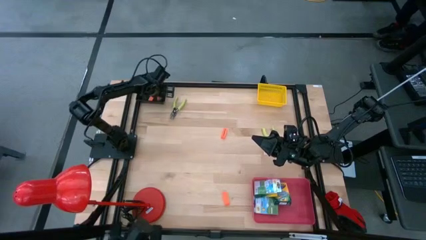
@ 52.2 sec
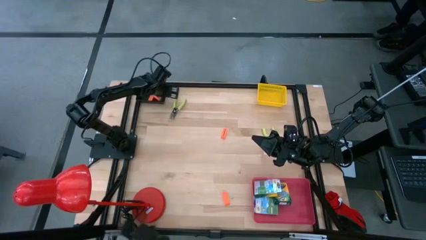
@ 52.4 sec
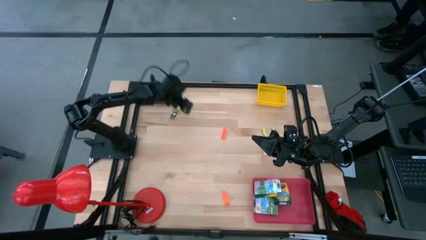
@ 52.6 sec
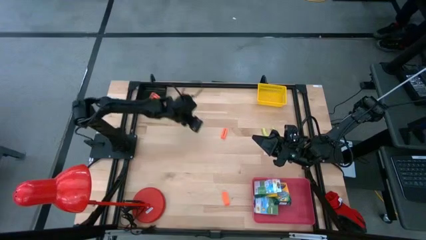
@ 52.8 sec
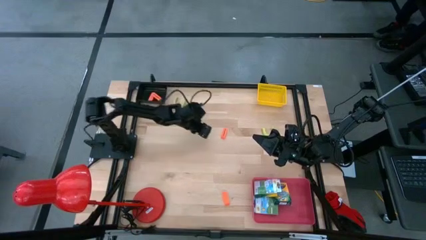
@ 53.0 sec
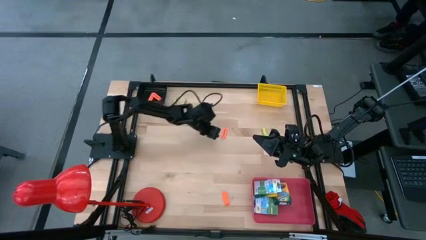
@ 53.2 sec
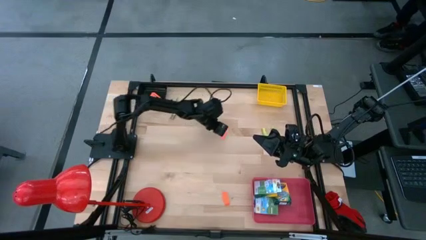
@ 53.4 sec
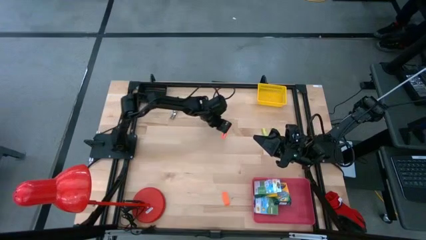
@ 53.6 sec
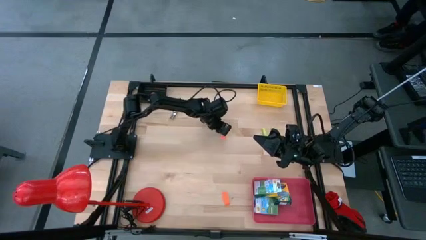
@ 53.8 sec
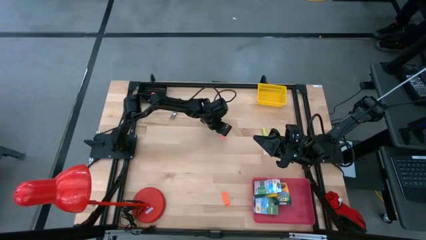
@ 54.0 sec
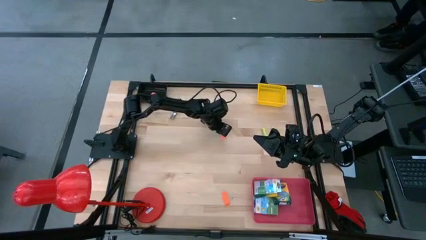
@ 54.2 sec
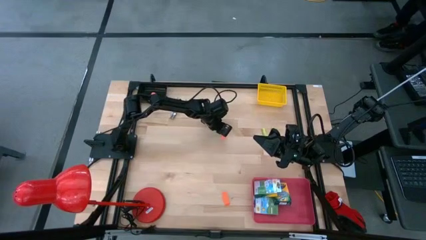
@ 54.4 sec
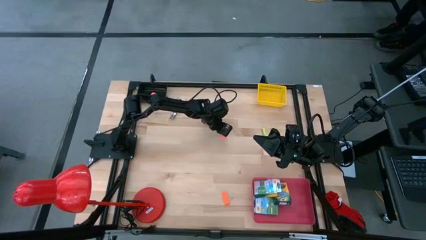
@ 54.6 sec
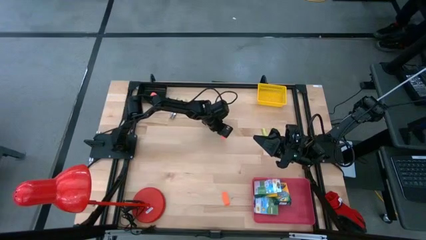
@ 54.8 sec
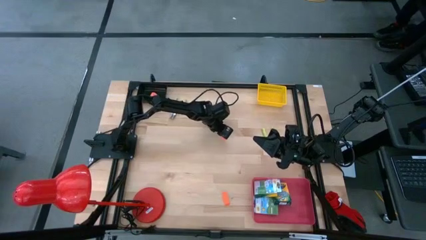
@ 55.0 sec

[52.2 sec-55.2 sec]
Task: Pick & Place School Supplies
Put the orange eraser into the black bin

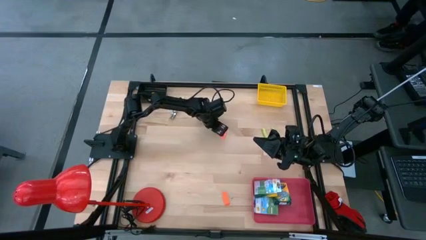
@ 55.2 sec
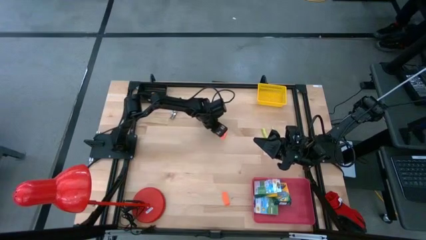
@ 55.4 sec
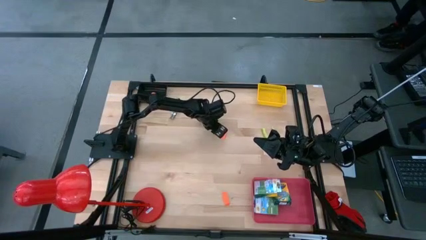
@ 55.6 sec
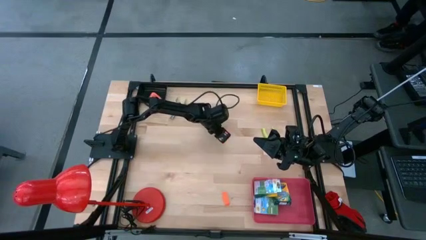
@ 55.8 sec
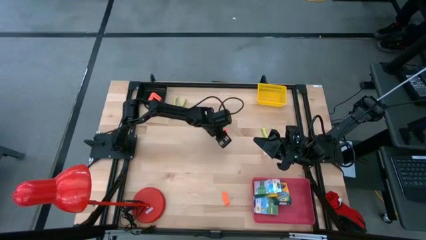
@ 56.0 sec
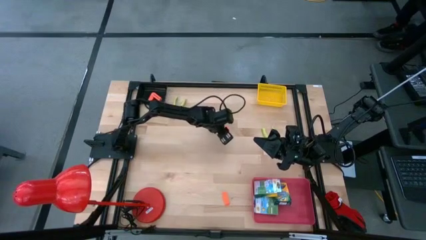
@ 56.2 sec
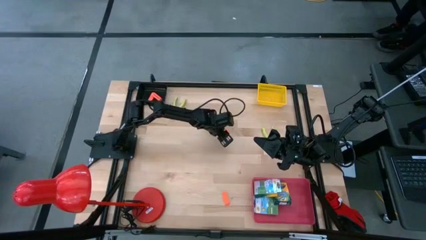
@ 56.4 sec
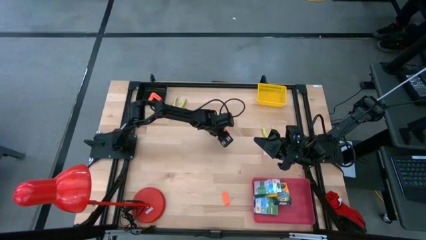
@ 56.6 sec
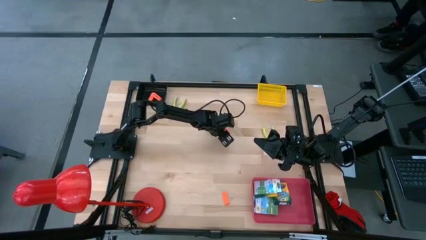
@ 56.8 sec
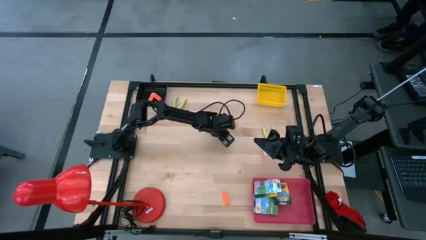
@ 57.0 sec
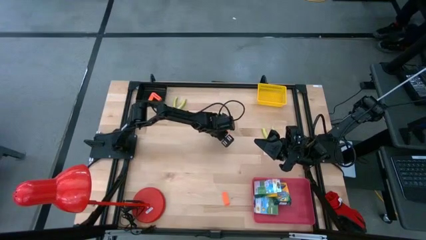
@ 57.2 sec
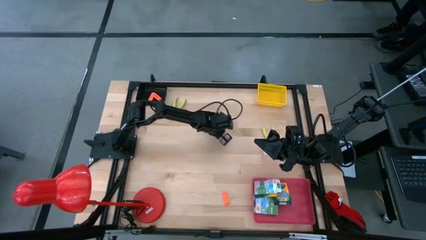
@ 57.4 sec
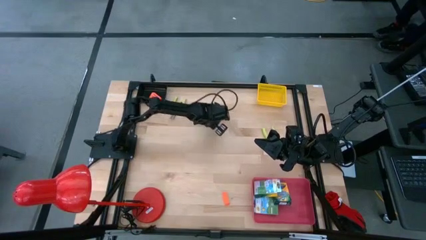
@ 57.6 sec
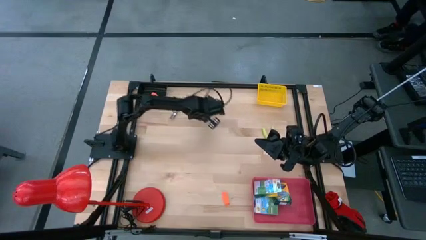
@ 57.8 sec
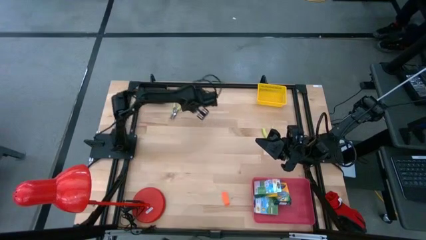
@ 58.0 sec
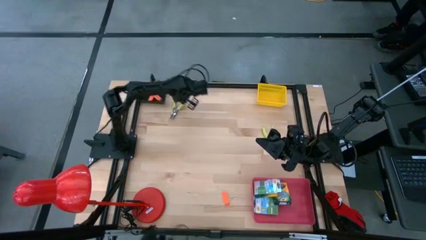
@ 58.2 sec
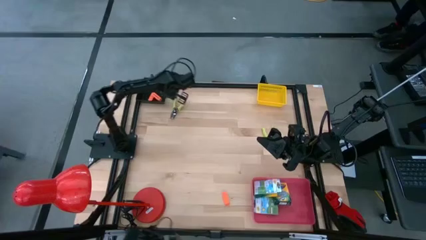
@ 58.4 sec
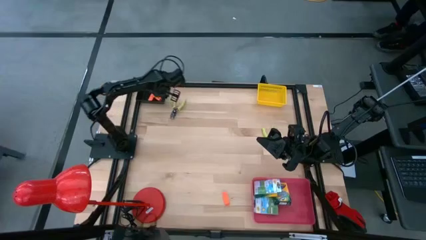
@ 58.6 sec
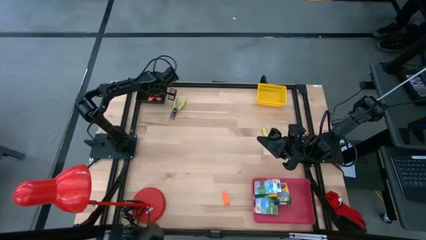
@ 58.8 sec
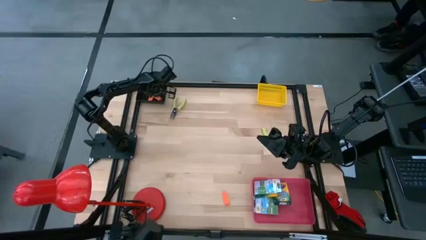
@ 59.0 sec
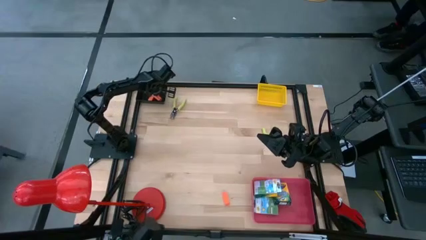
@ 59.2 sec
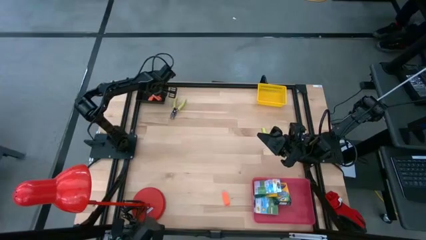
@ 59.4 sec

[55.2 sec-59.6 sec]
Put the orange eraser into the black bin

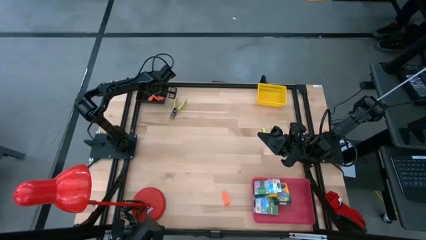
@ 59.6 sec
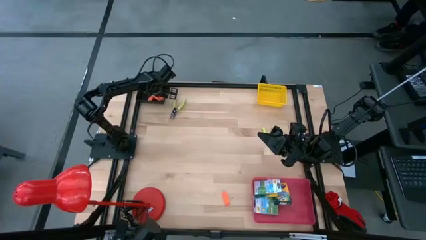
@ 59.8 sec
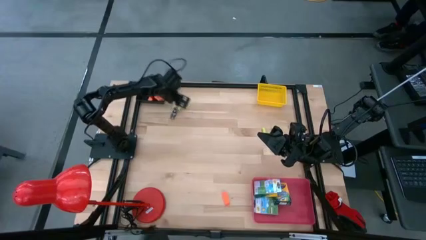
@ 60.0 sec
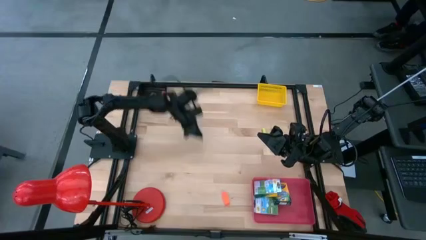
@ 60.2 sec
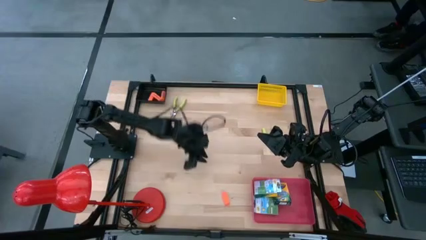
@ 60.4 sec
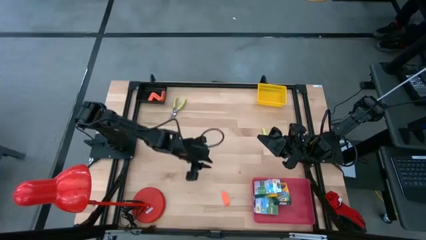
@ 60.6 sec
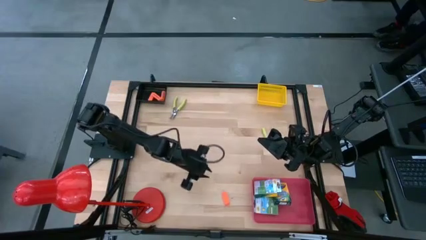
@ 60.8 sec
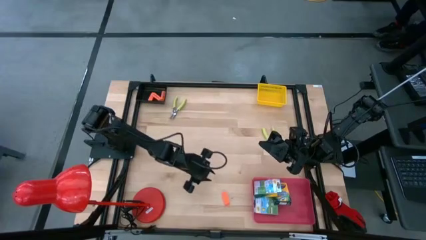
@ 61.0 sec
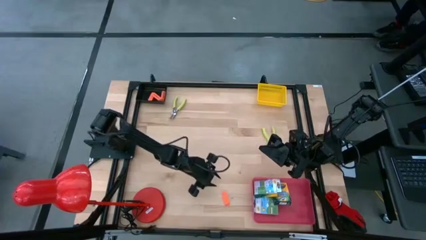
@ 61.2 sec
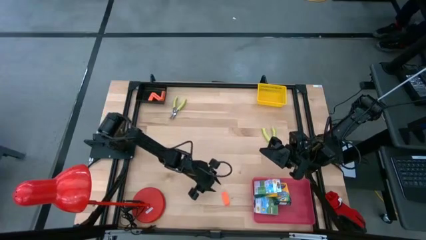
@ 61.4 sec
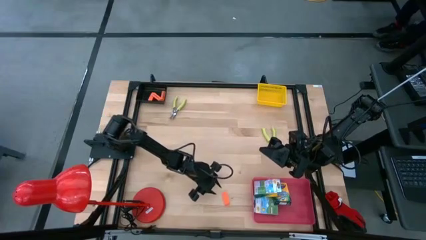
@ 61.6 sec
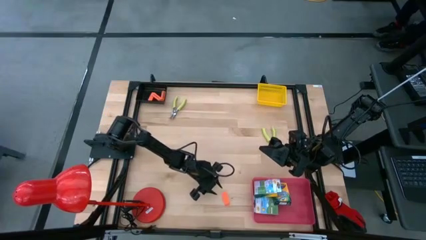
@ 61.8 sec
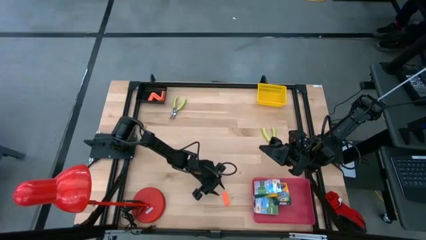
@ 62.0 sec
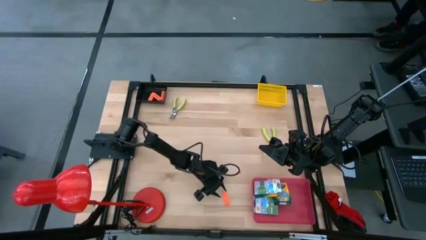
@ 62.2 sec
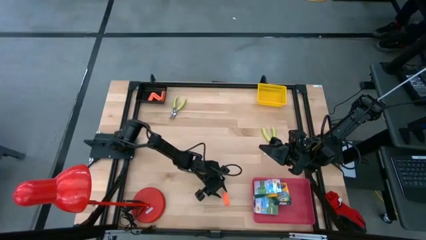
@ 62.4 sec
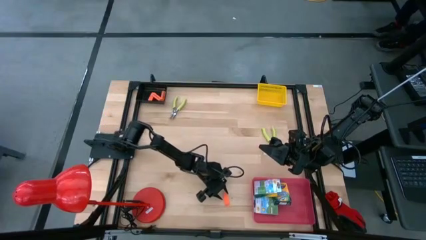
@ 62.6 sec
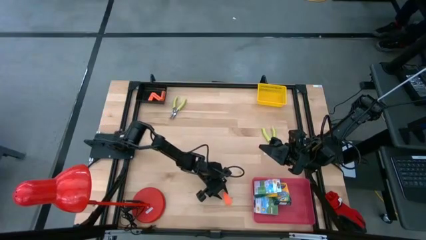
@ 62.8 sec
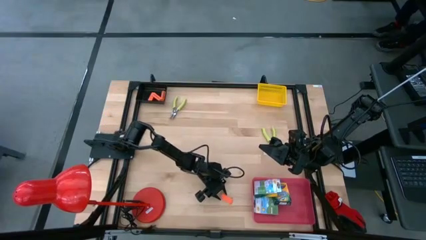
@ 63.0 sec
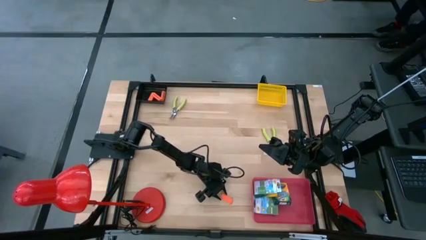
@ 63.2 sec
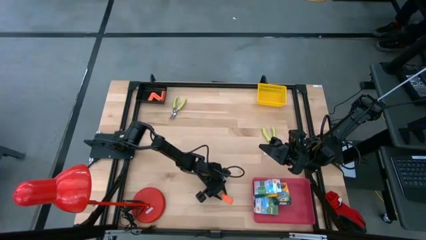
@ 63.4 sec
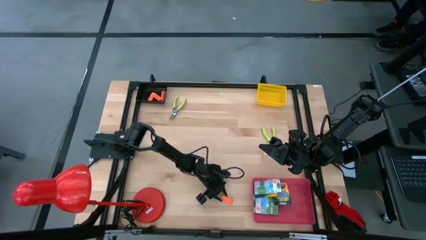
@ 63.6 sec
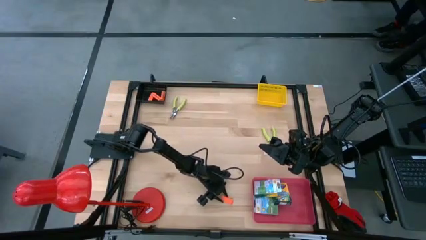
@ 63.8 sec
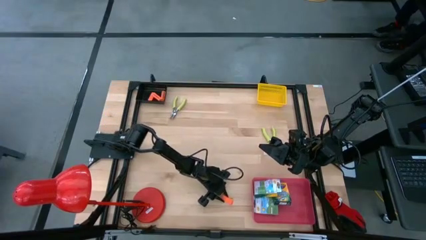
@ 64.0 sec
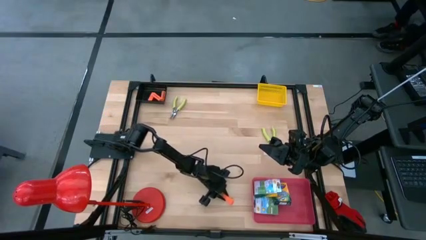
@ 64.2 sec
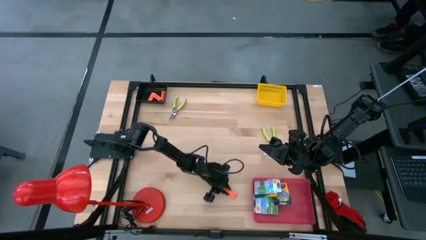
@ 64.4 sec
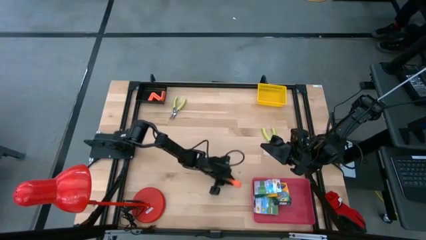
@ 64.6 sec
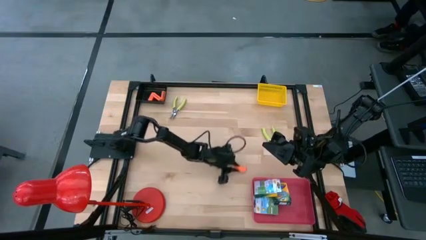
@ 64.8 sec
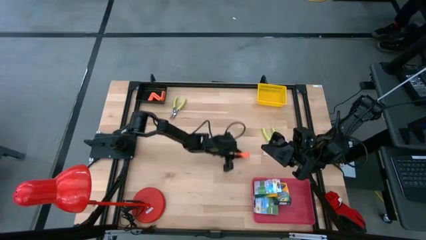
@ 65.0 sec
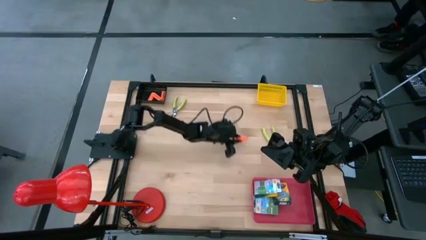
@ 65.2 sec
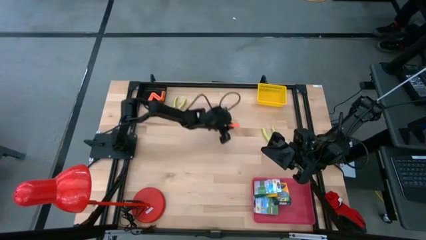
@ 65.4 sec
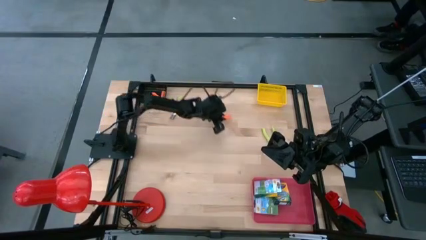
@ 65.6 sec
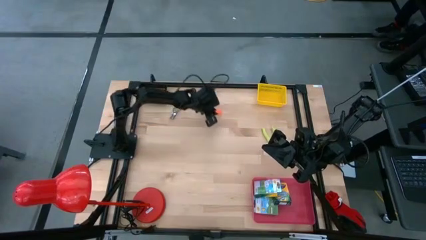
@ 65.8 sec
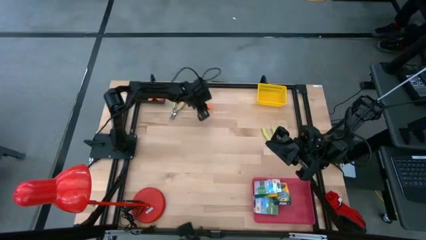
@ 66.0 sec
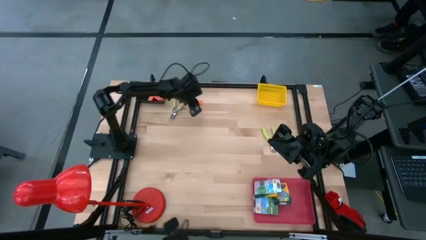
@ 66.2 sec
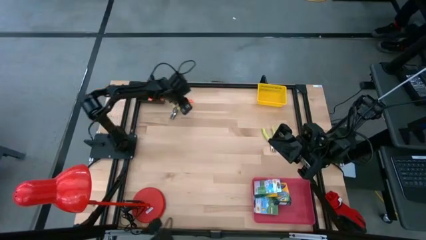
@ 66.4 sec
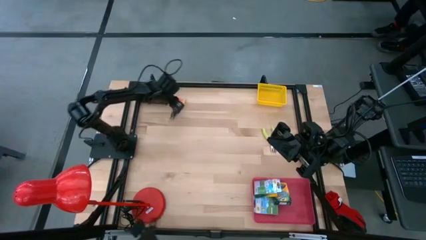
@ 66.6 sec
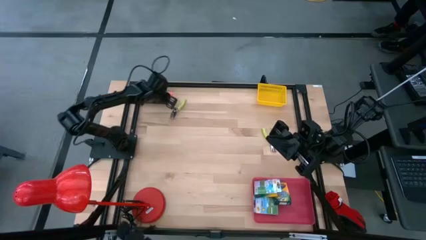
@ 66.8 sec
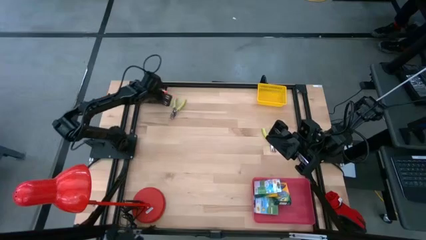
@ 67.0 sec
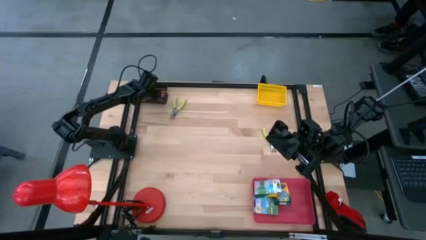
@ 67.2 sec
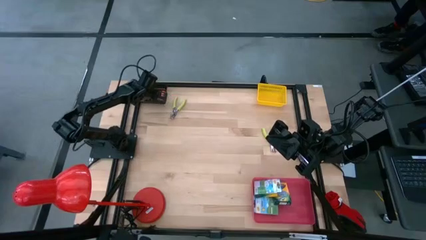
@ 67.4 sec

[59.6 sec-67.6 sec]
Put the orange eraser into the black bin

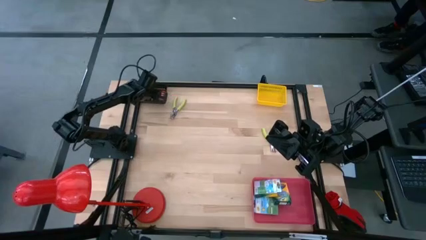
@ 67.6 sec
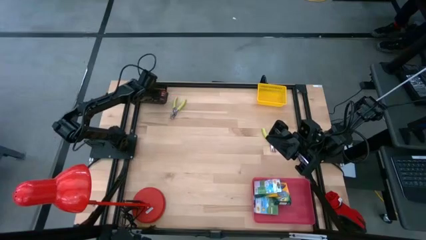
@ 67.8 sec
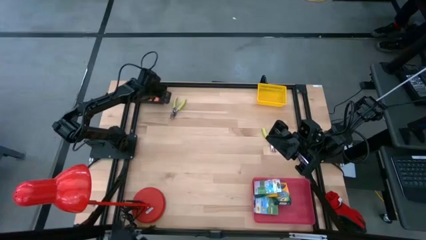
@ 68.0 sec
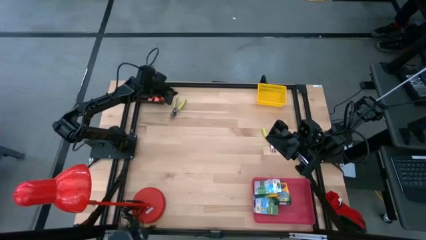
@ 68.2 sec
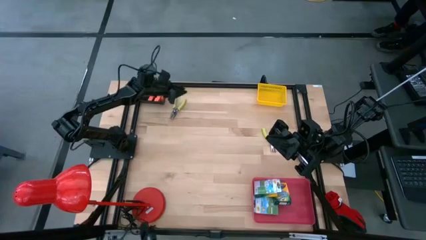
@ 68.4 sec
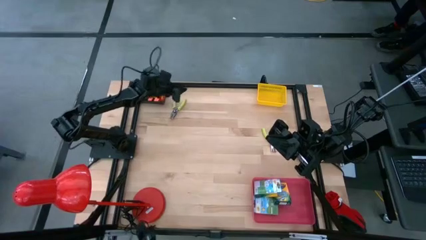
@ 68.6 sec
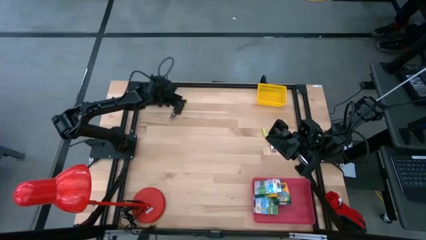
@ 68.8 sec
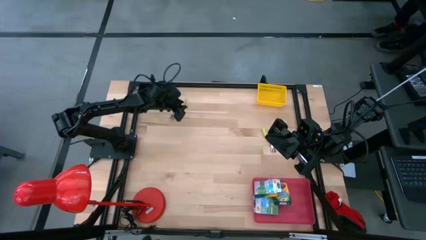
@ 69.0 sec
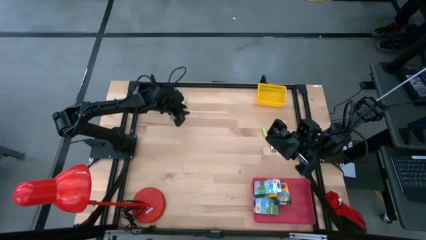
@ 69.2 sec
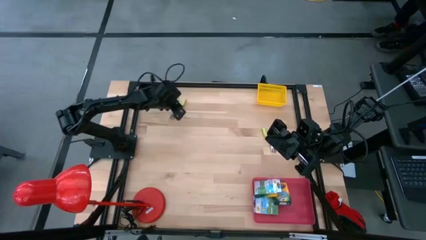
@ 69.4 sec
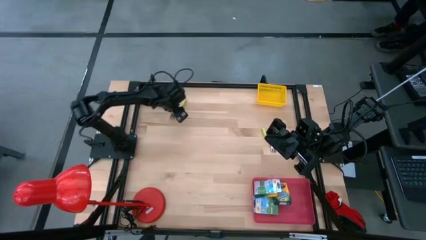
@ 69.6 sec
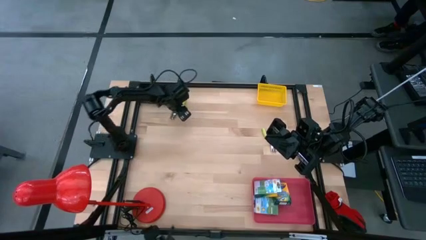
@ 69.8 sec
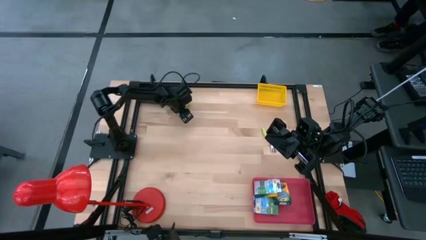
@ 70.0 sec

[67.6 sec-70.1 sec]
Put the green puncher into the yellow bin
